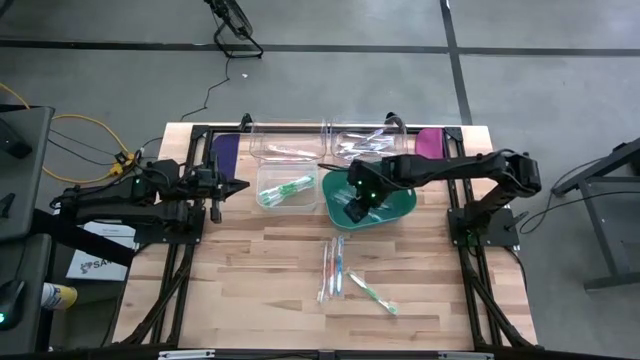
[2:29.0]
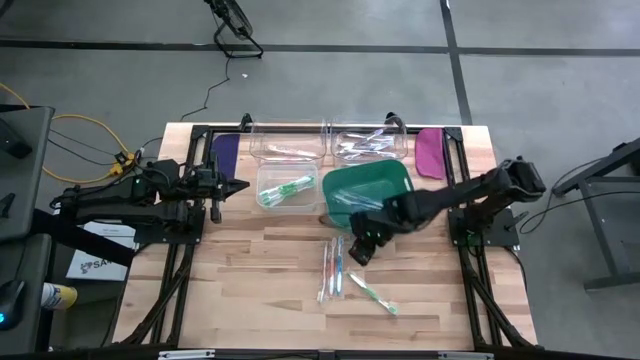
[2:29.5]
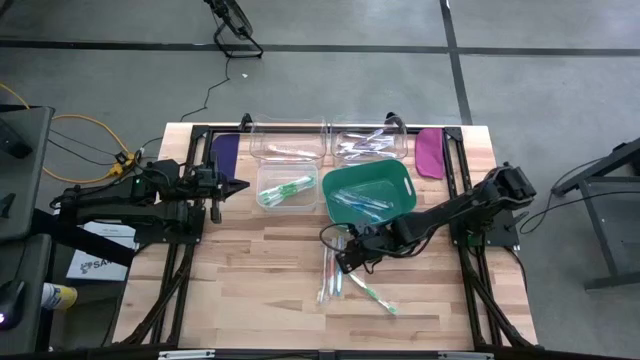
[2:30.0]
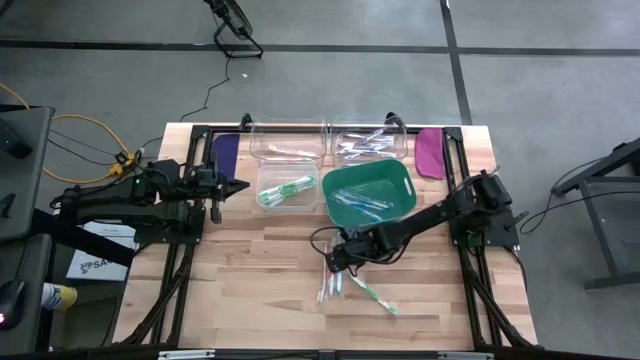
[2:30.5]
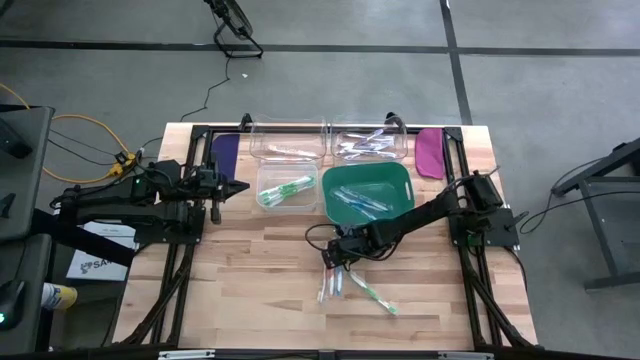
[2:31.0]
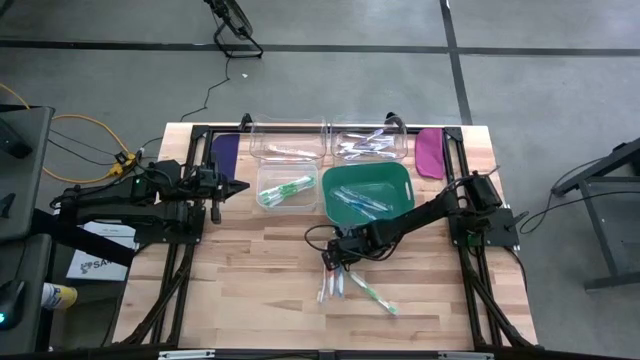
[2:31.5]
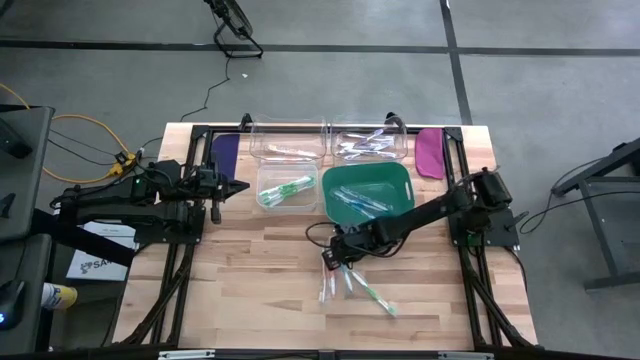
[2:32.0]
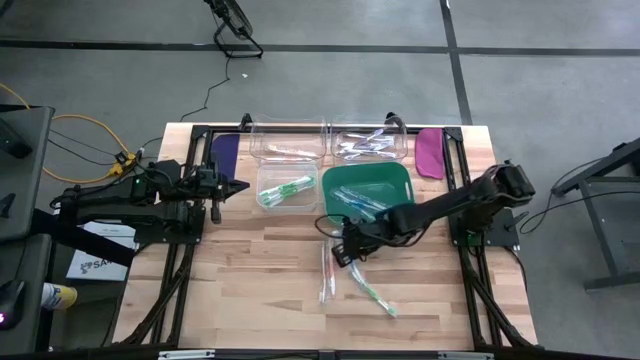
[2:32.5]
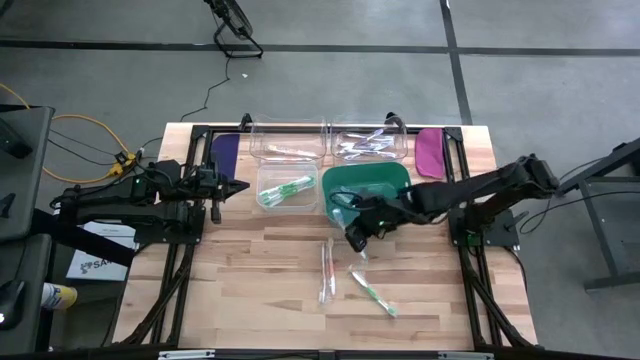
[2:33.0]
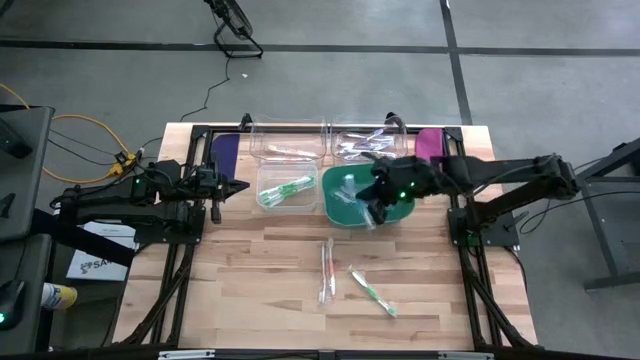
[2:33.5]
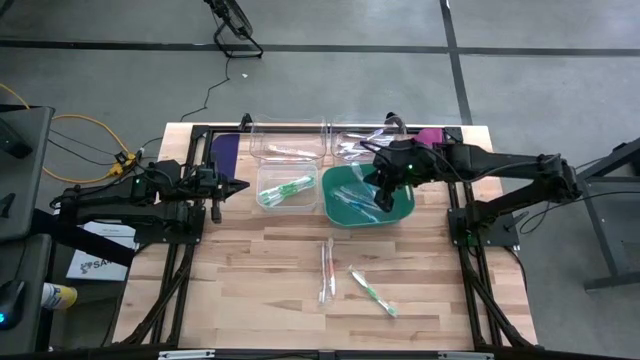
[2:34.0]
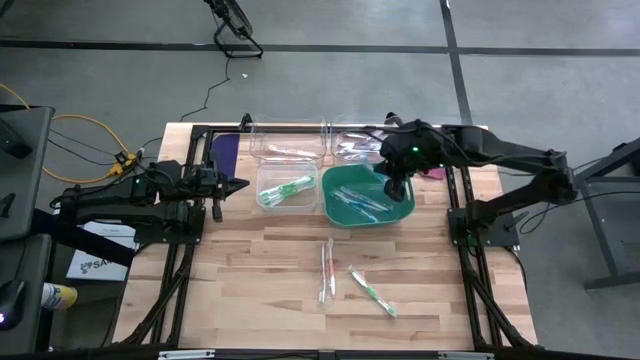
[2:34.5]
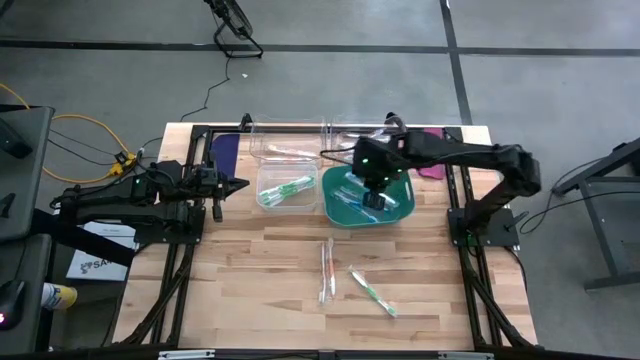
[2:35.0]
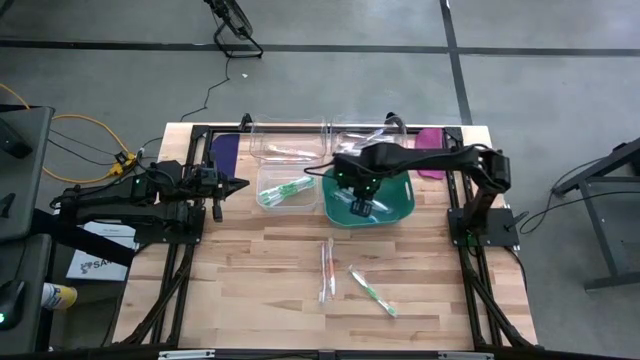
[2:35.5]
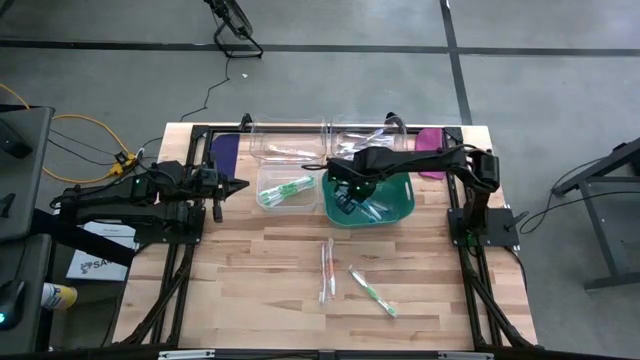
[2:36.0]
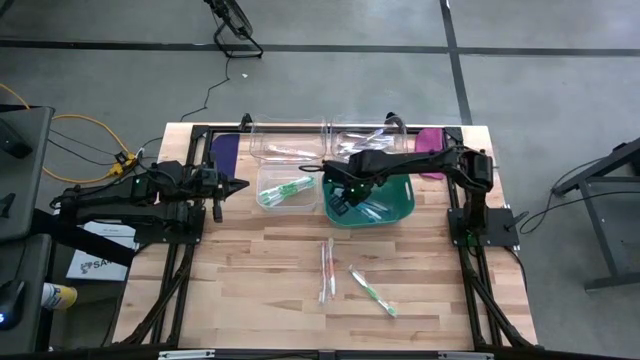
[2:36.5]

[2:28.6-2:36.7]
Task: Pick & Place Toothbrushes
Put the blue toothbrush into the green bin

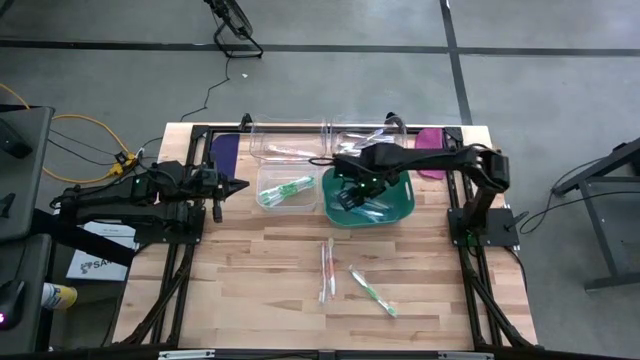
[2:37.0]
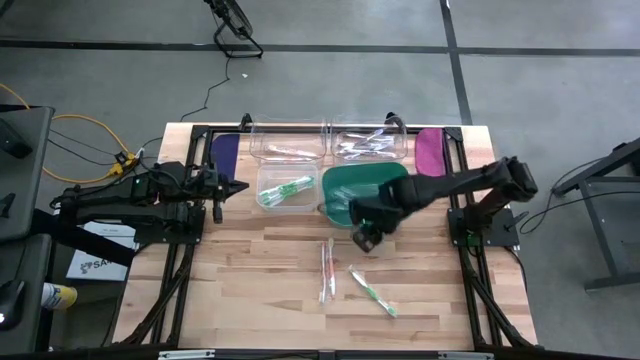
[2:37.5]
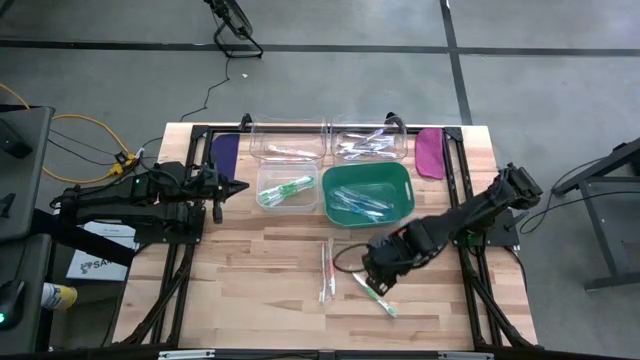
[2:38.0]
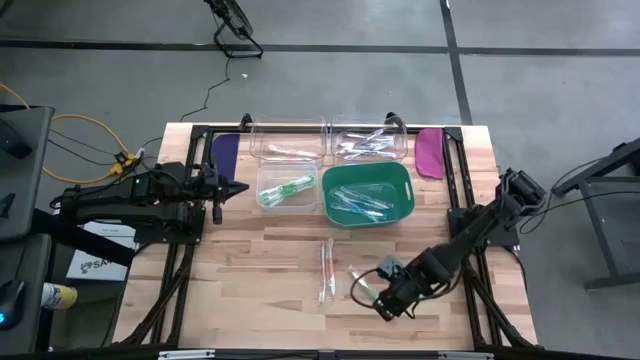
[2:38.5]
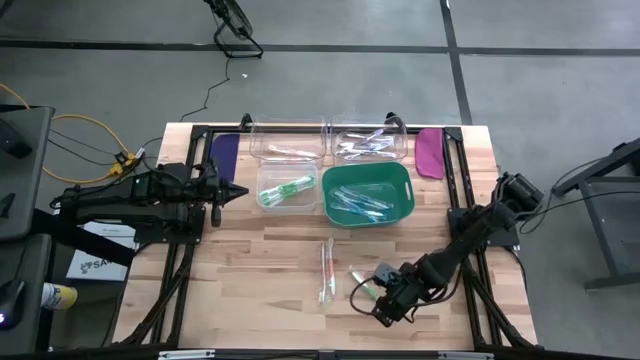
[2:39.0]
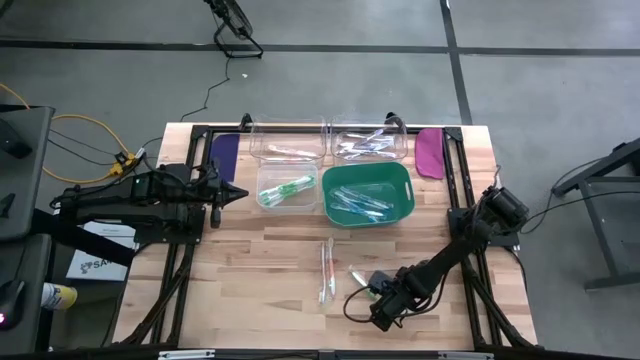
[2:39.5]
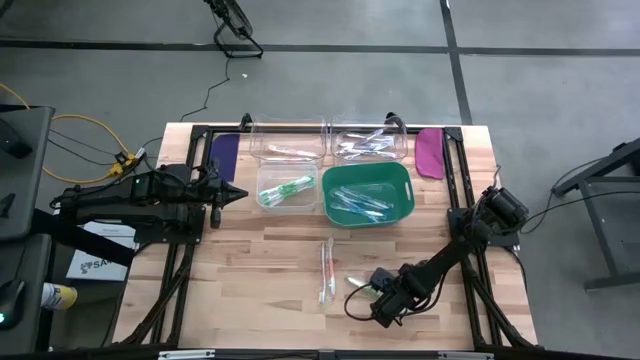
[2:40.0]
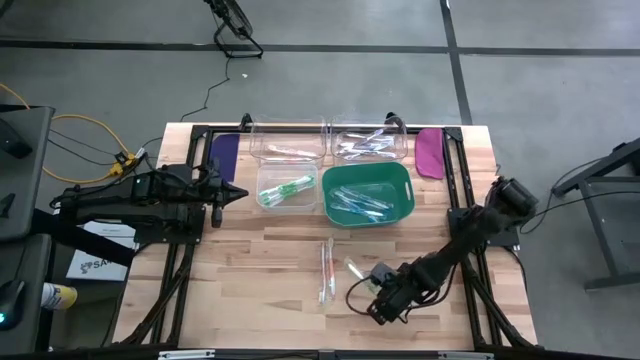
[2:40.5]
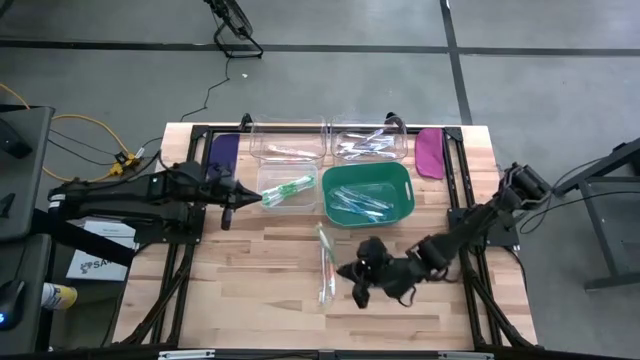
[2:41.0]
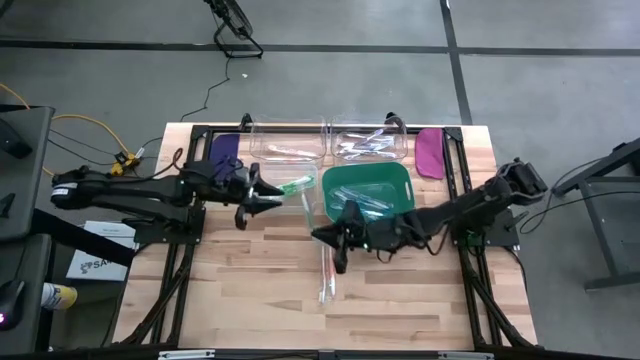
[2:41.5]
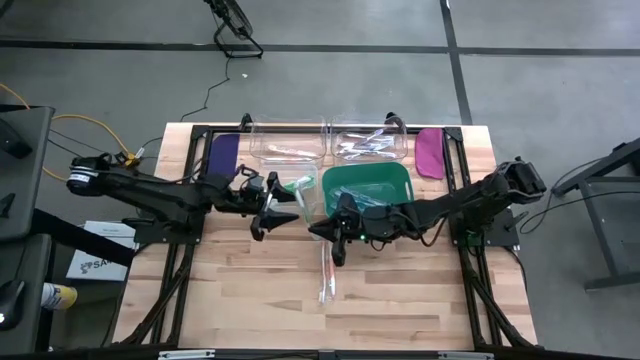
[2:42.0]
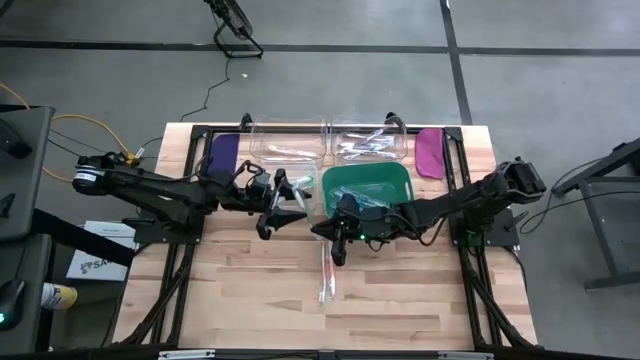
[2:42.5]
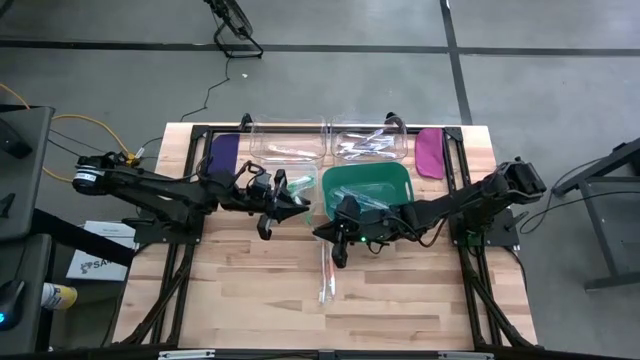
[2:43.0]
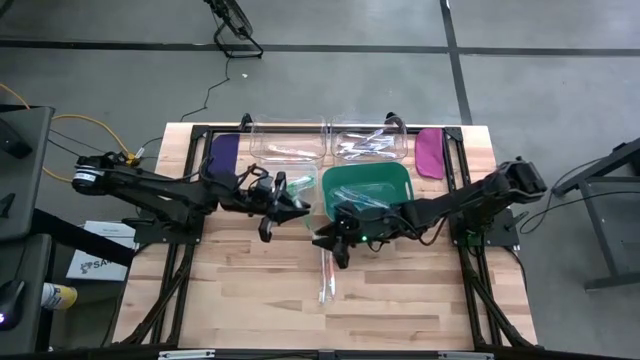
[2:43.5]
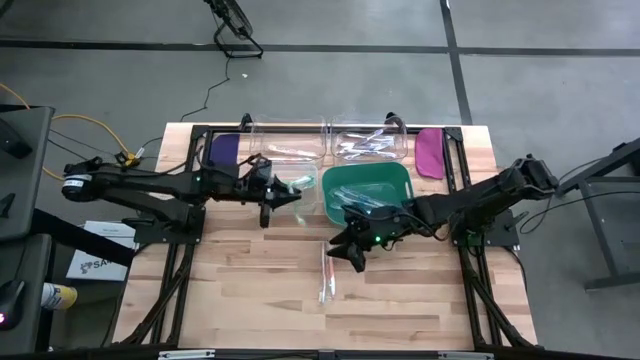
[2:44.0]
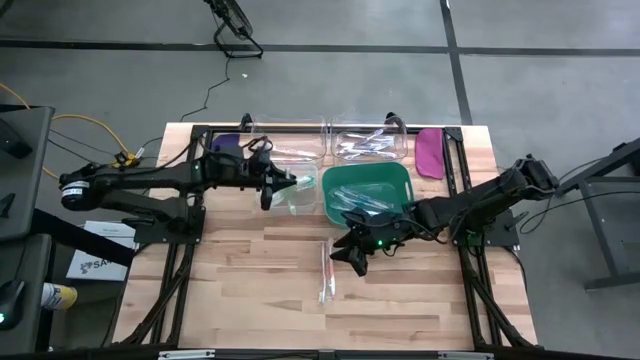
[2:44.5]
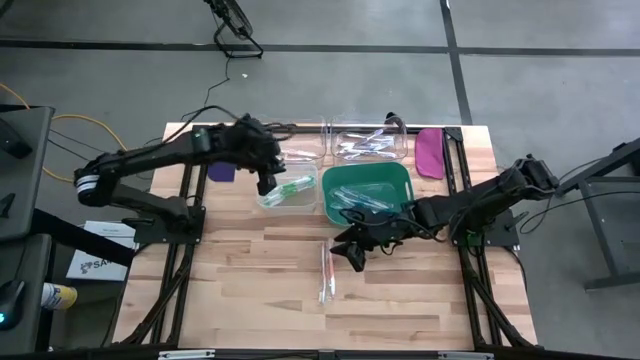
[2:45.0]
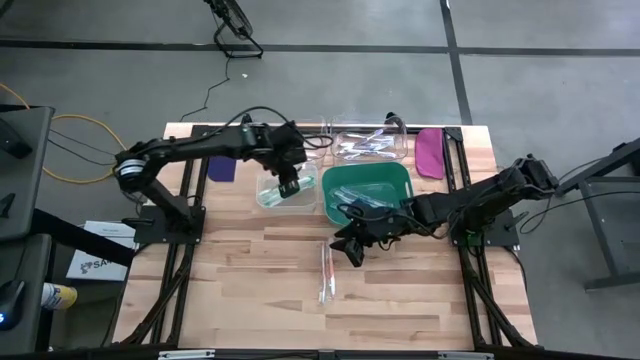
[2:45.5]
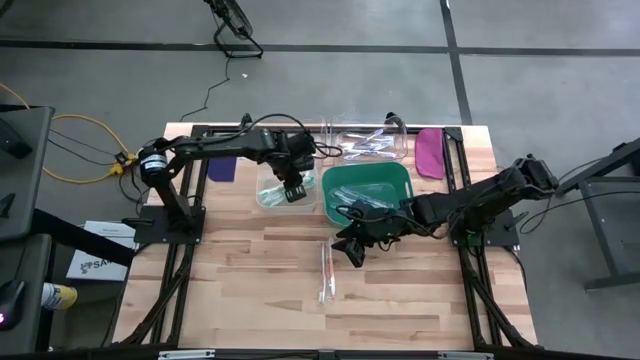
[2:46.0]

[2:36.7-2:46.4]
Put the green toothbrush into the white bin

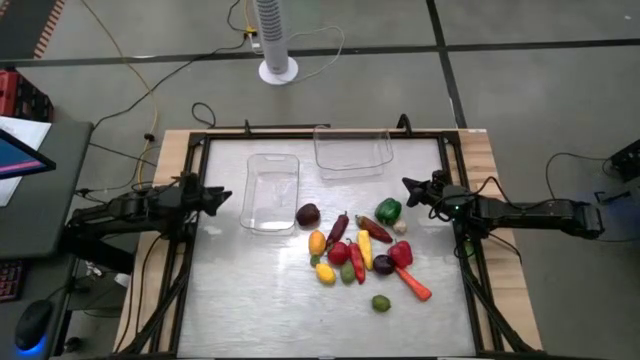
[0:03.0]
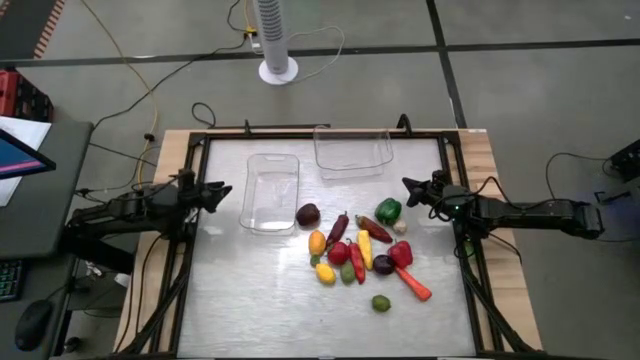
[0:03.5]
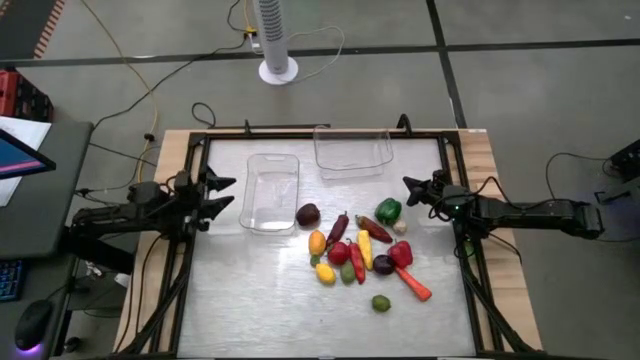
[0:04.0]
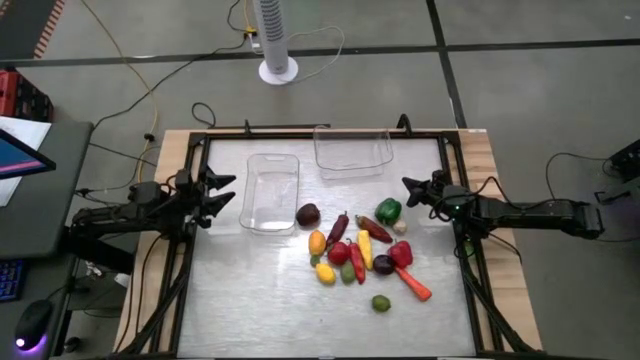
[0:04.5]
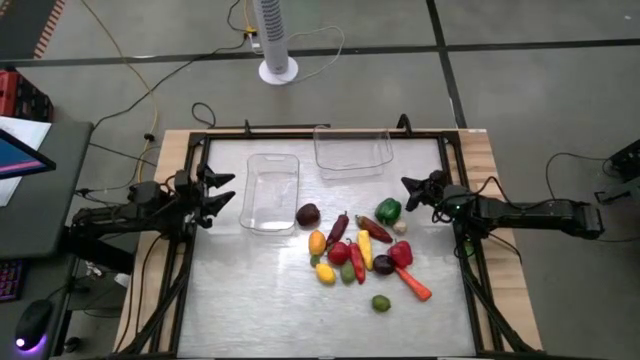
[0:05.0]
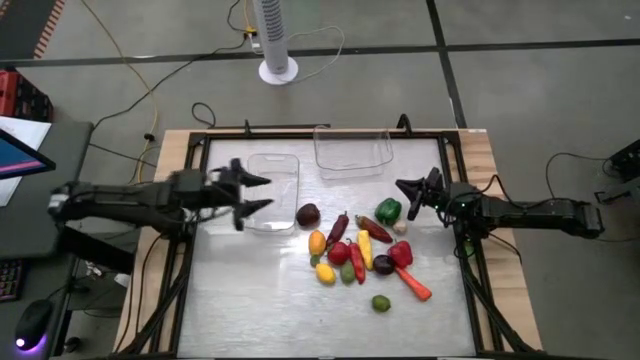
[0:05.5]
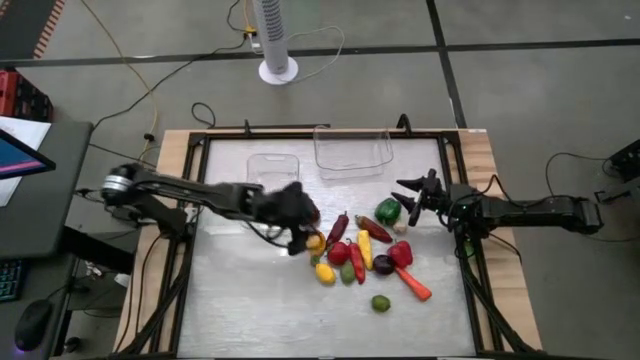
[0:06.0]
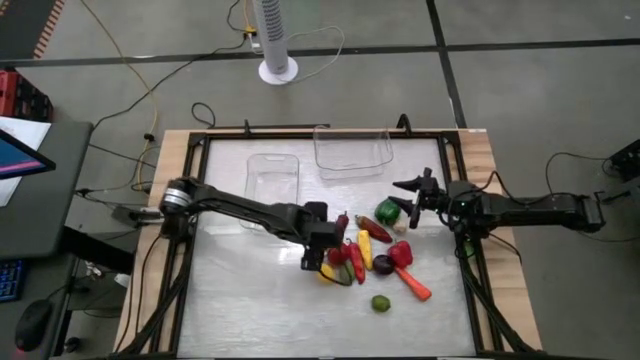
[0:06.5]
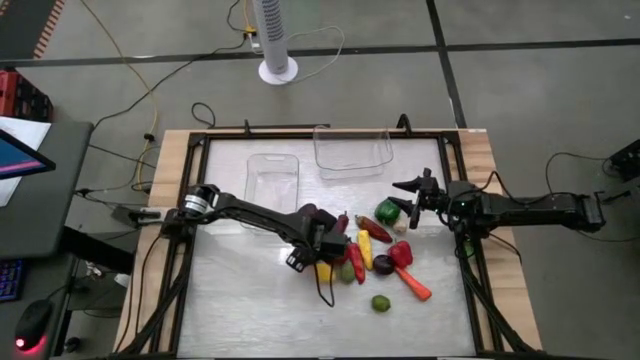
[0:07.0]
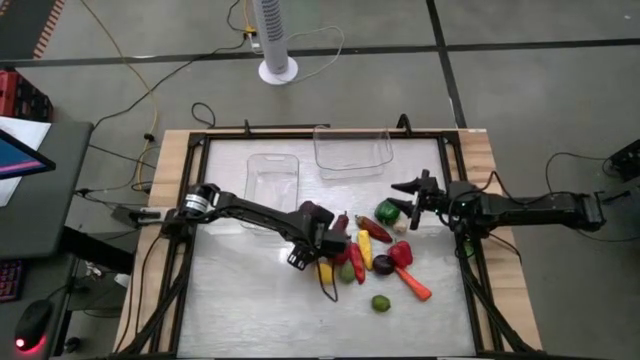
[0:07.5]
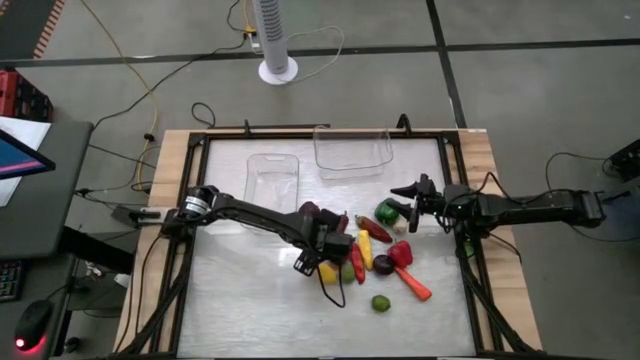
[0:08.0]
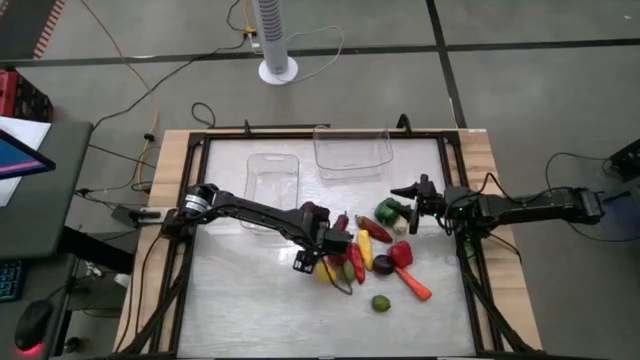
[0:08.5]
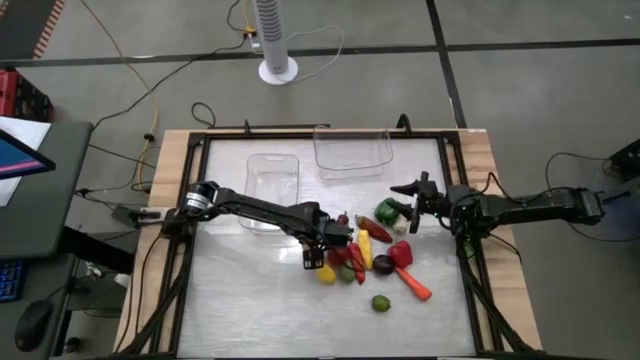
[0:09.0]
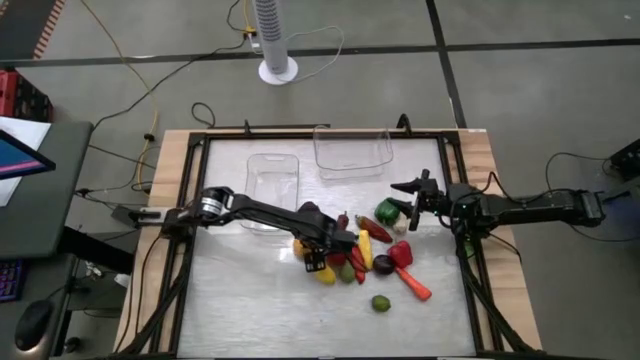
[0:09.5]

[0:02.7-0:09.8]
Task: Sort produce into baskets
Put the top yellow lemon into the right transparent bin
